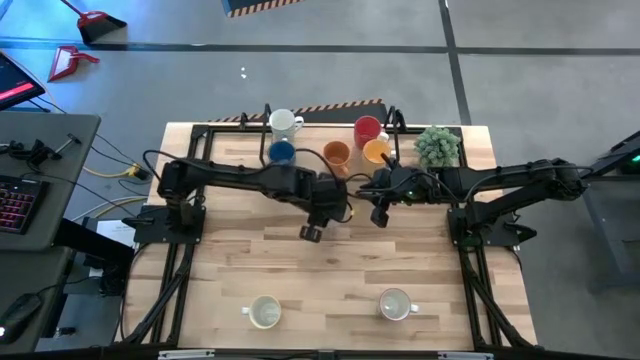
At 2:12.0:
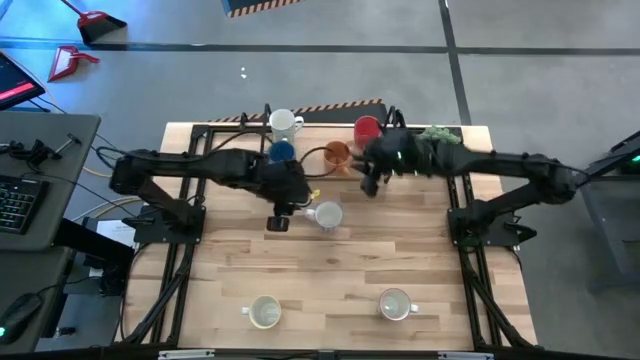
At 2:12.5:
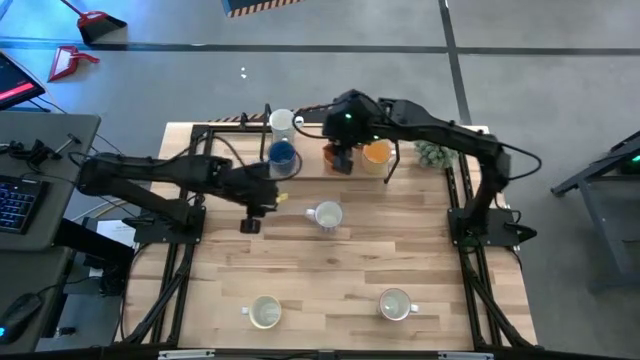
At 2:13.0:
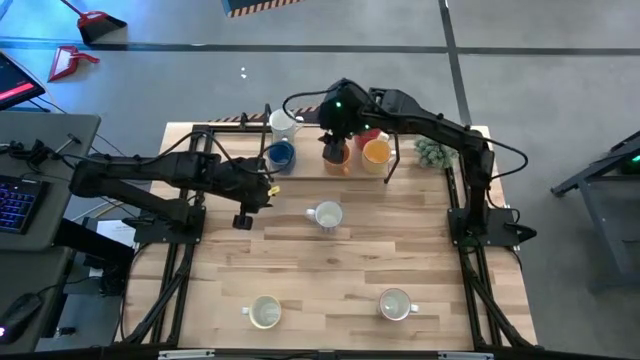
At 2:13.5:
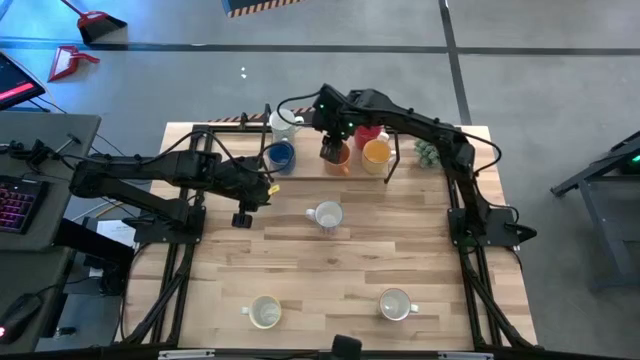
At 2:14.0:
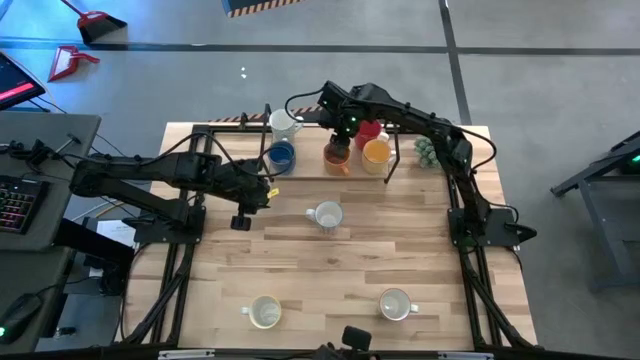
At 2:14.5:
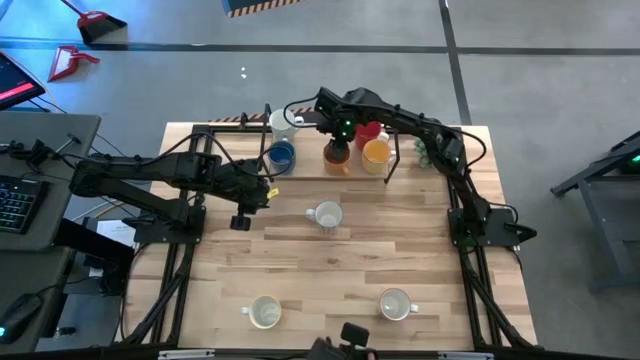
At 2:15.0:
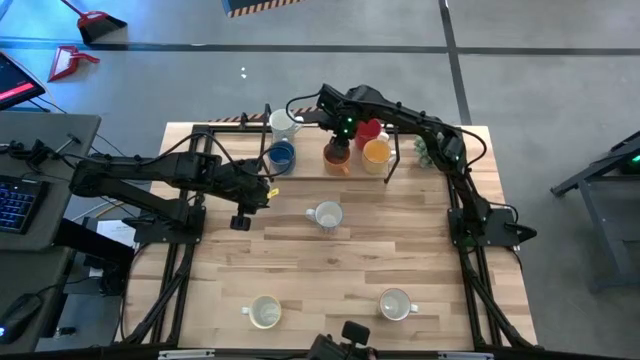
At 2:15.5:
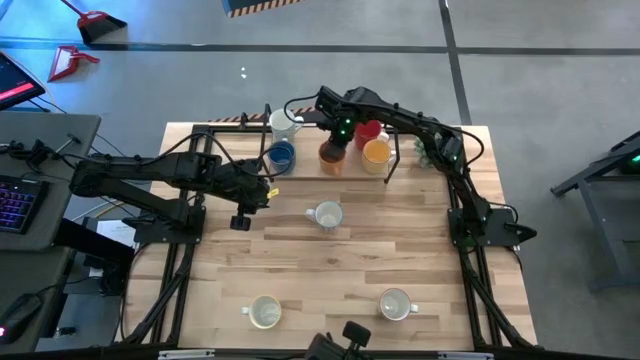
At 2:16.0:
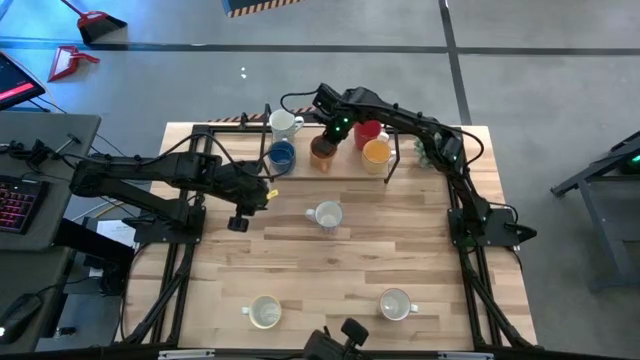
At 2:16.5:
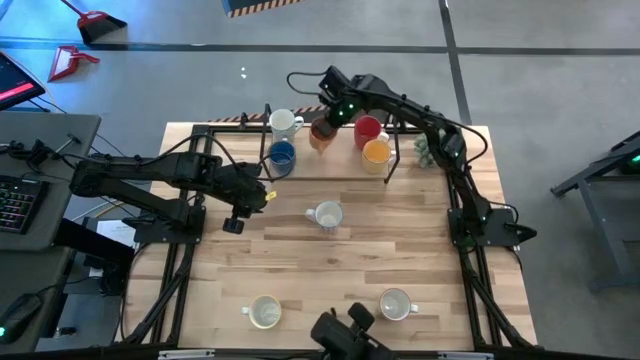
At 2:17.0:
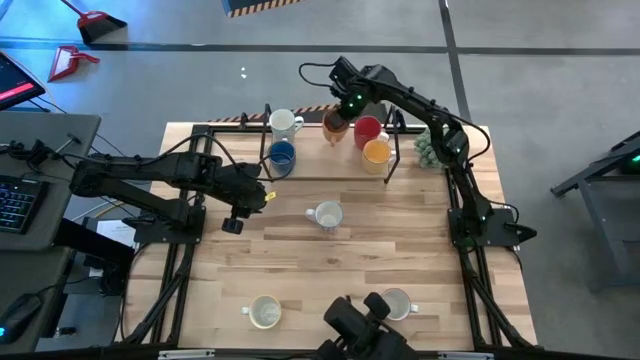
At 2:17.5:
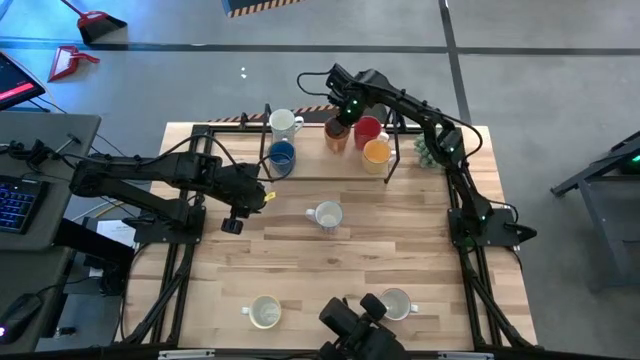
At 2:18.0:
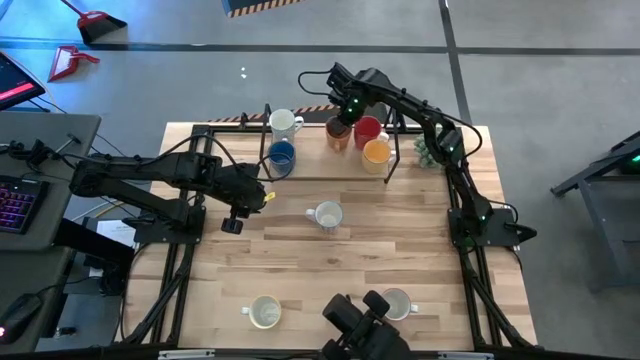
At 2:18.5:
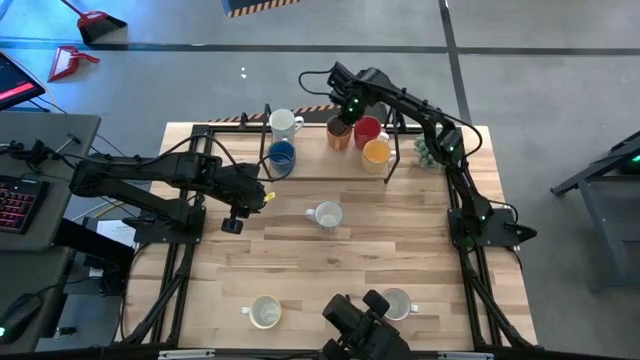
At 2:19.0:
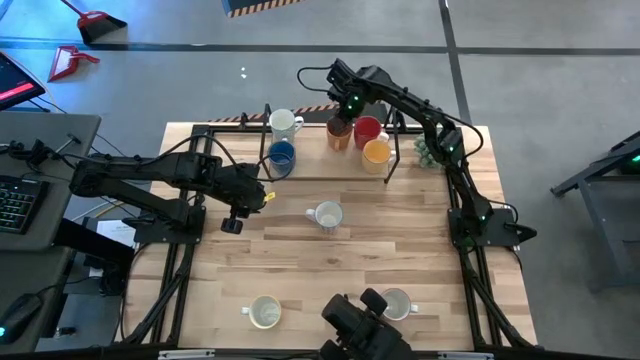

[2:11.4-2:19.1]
Task: Place coffee mugs
Adjust the orange mug on the shelf

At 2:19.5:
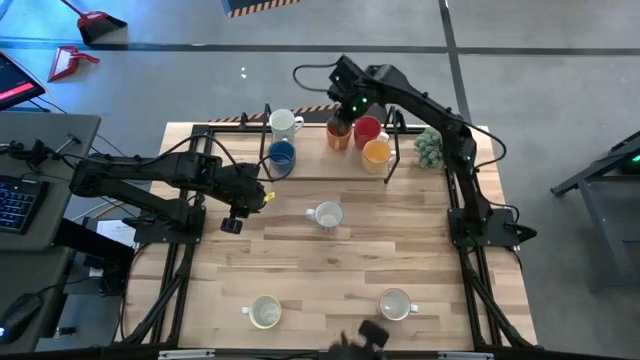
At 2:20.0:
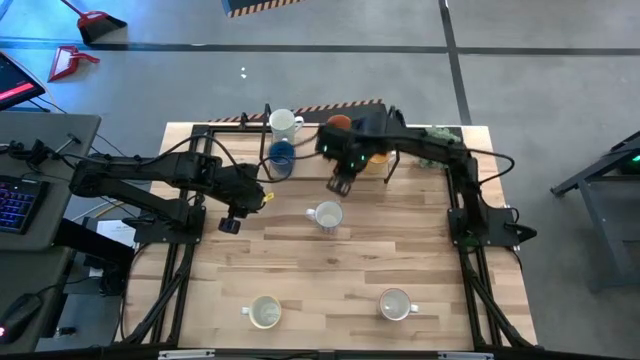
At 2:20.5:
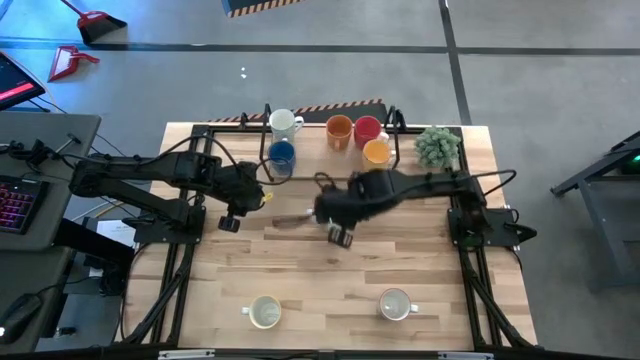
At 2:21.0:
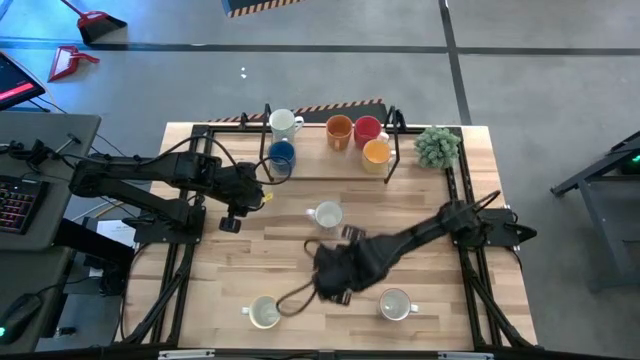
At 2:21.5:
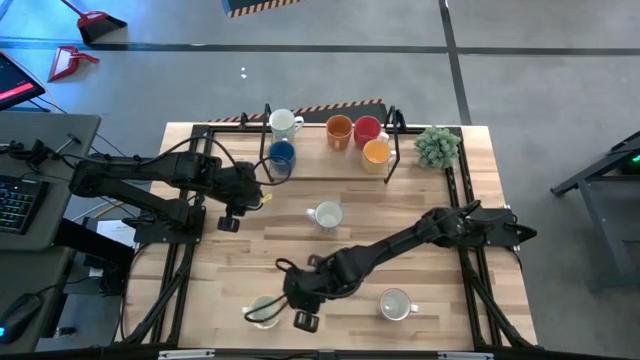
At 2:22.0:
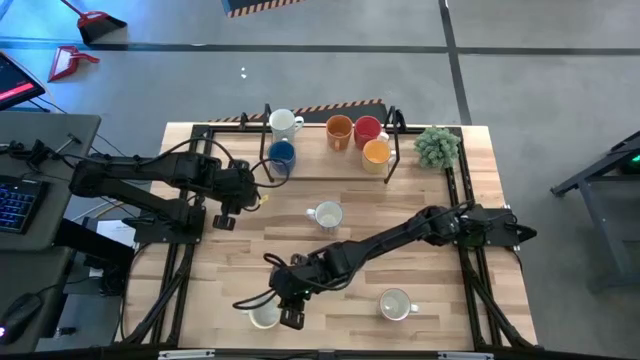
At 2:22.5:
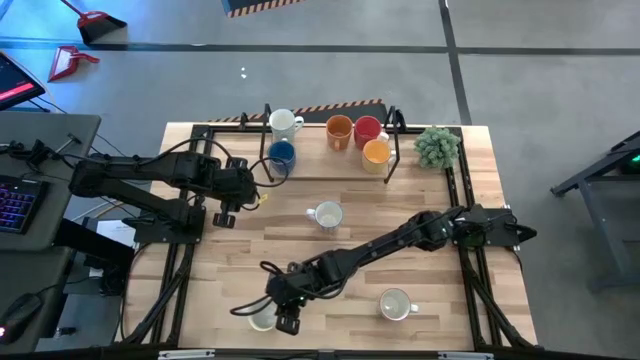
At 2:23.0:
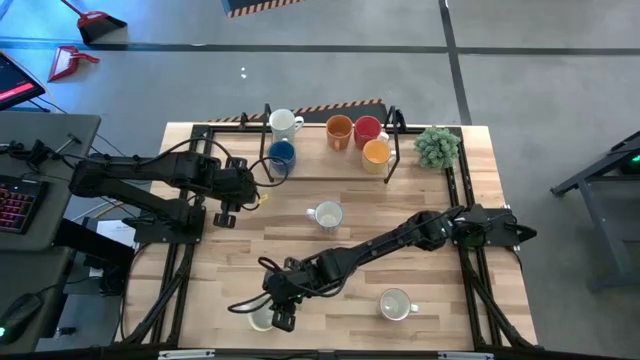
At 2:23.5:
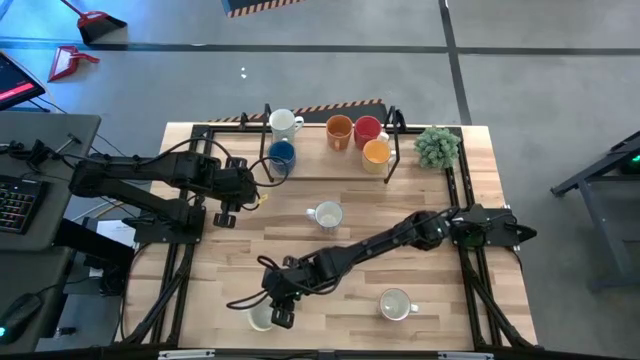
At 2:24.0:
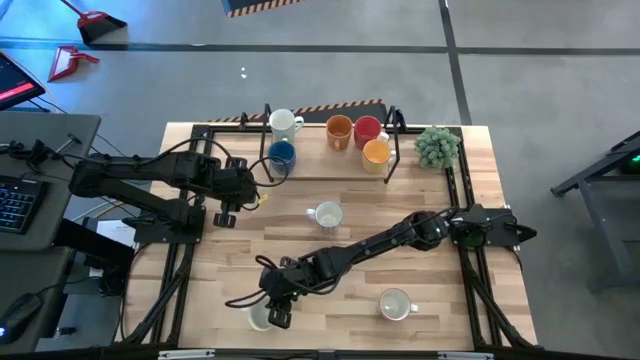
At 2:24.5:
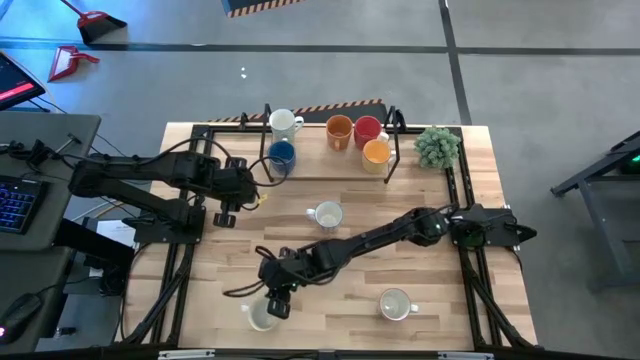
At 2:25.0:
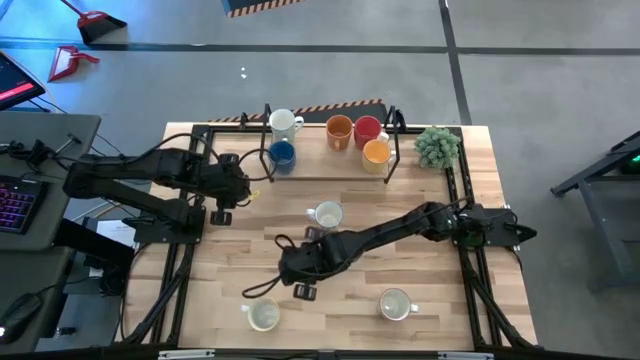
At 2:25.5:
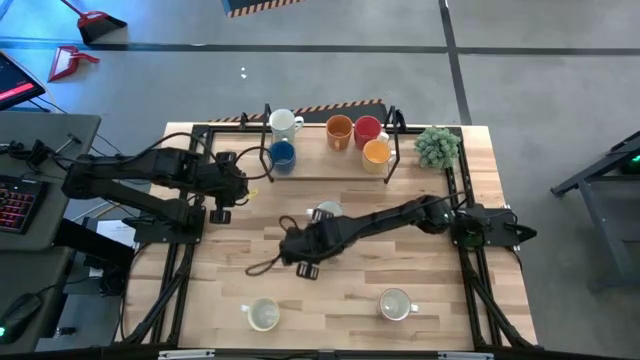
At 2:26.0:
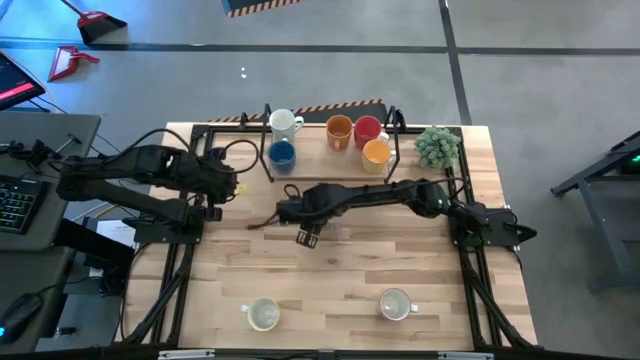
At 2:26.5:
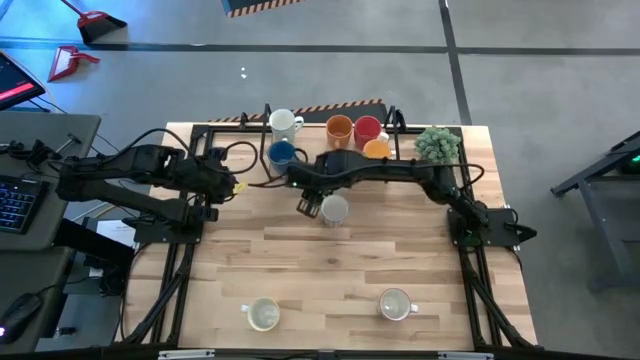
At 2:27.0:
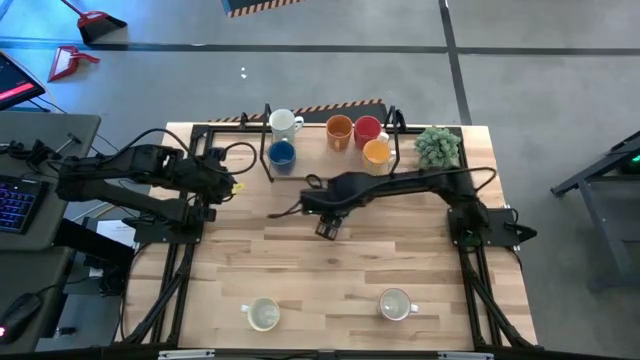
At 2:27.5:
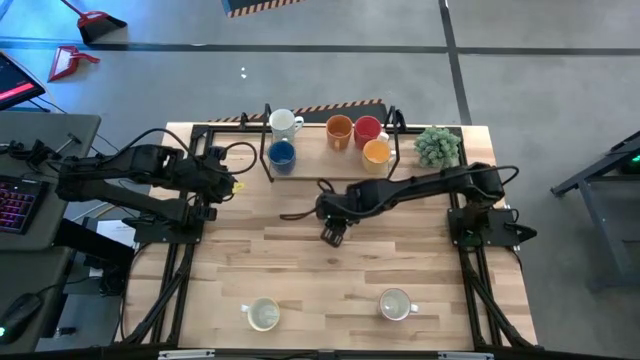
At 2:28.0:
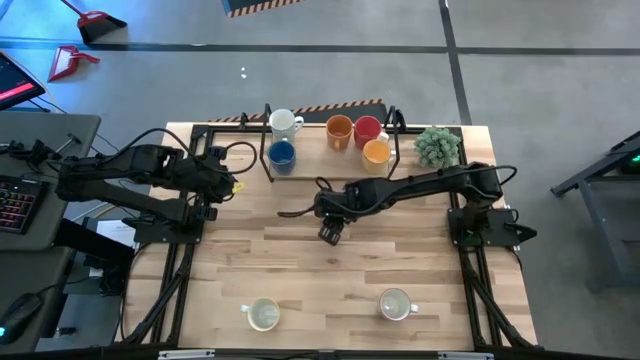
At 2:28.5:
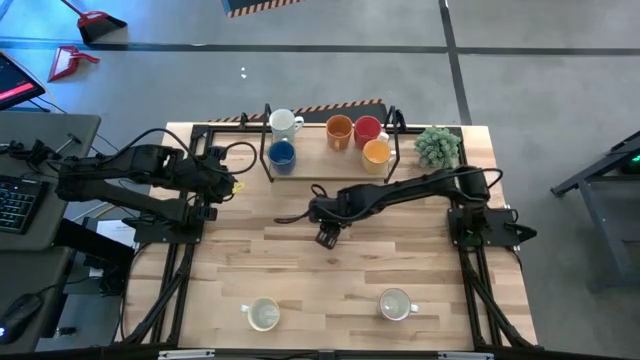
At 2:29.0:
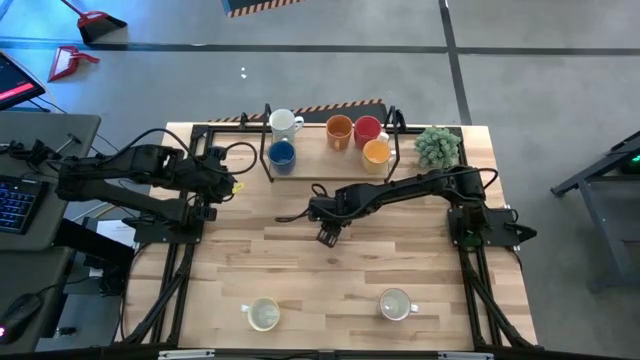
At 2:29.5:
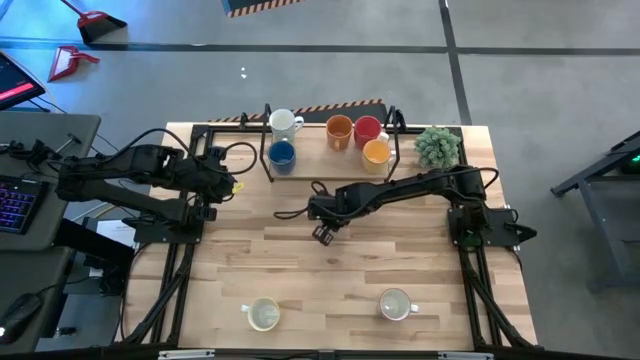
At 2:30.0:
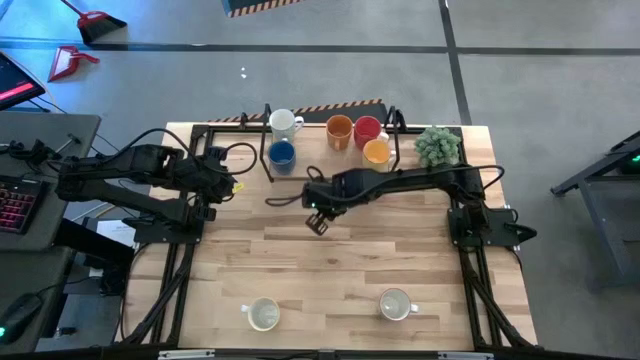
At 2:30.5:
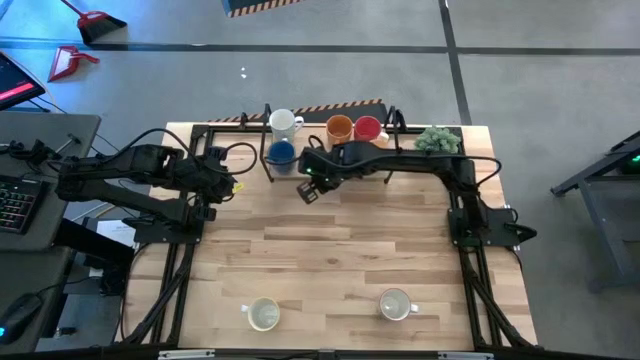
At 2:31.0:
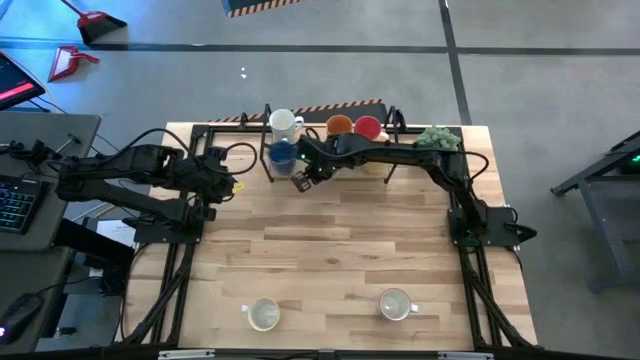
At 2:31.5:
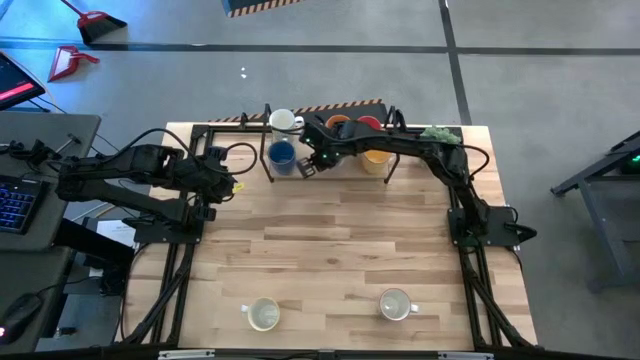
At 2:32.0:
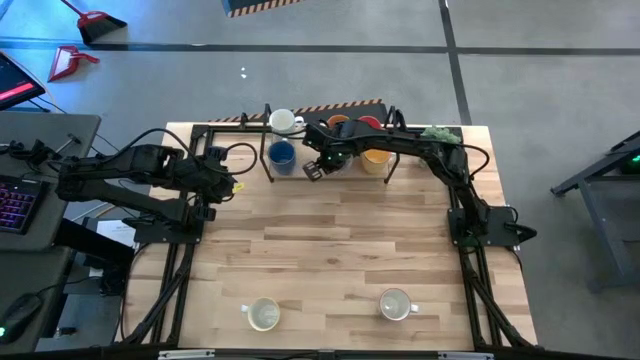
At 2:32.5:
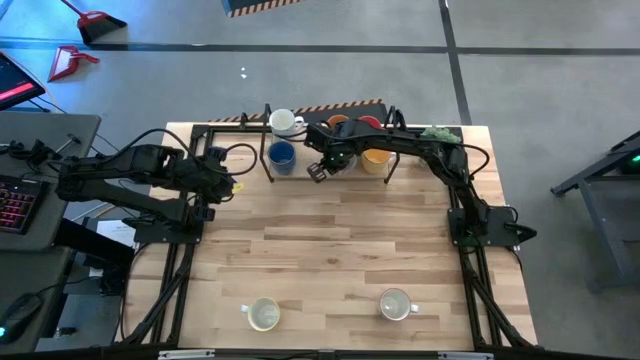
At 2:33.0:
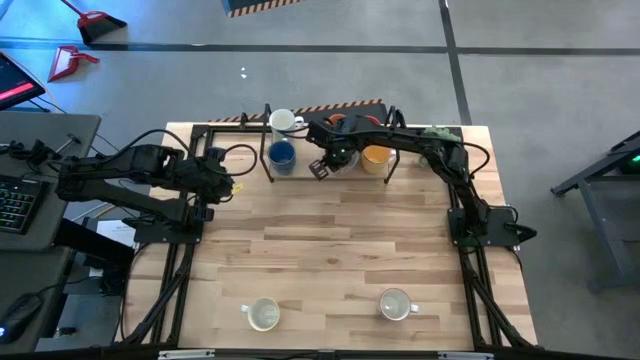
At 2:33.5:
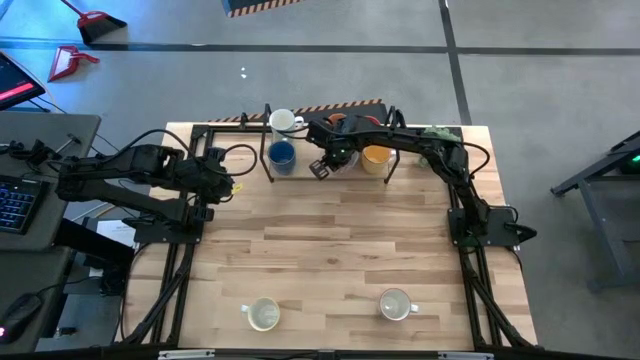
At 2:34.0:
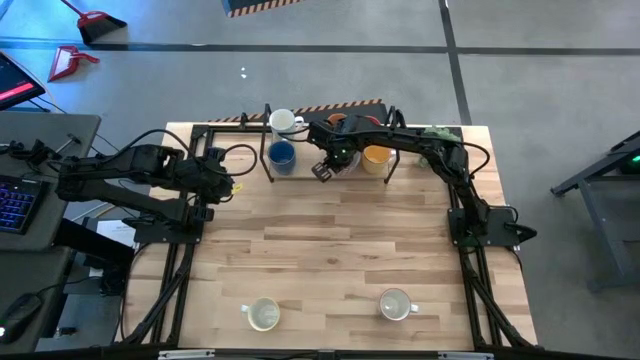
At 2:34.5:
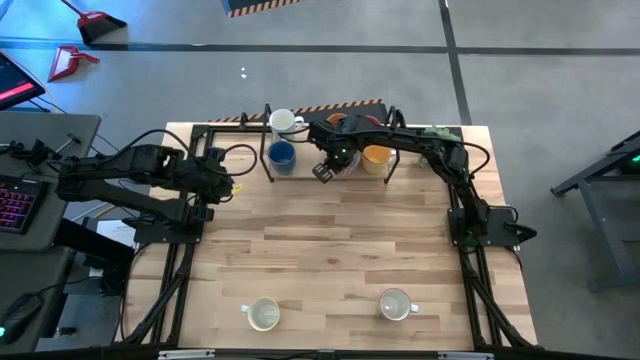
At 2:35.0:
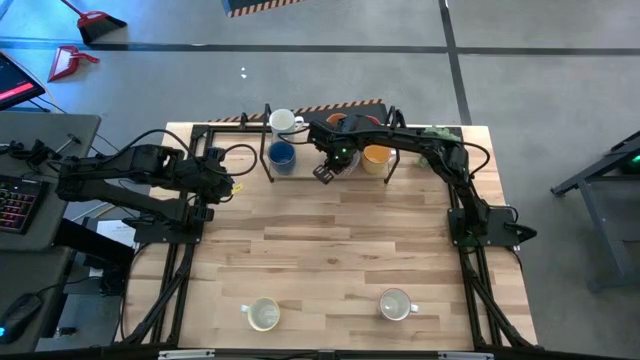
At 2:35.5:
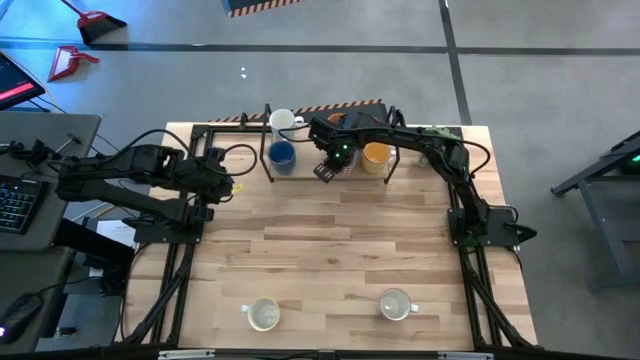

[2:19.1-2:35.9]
Put the white red mug on the shelf
